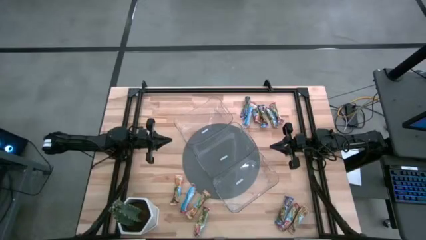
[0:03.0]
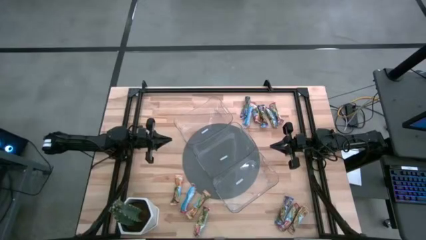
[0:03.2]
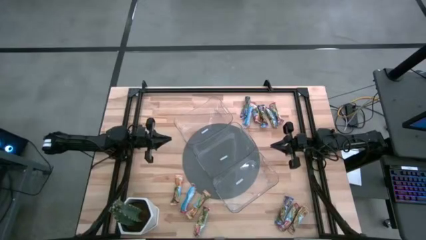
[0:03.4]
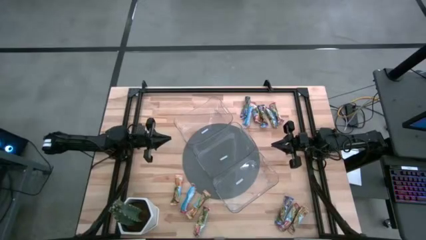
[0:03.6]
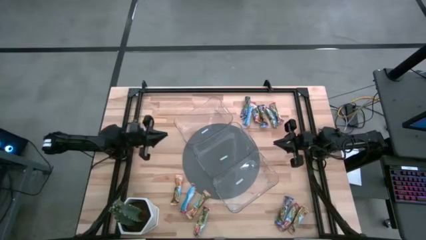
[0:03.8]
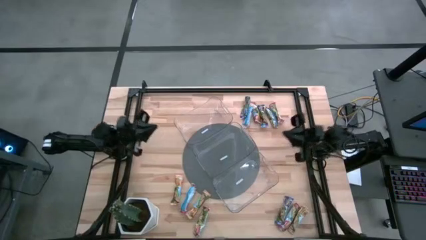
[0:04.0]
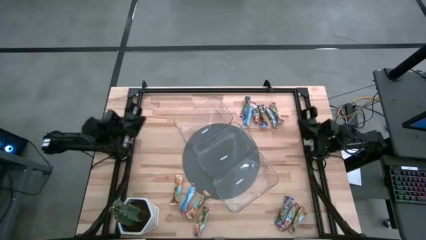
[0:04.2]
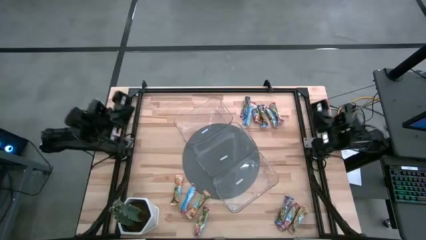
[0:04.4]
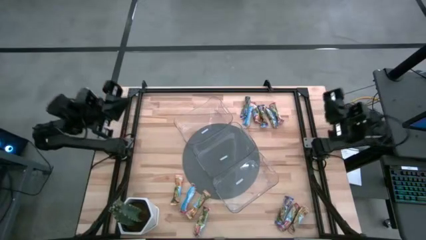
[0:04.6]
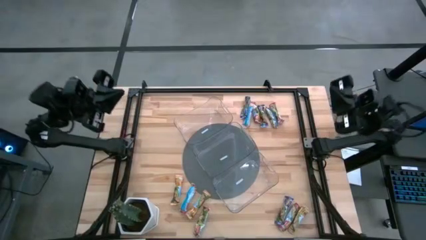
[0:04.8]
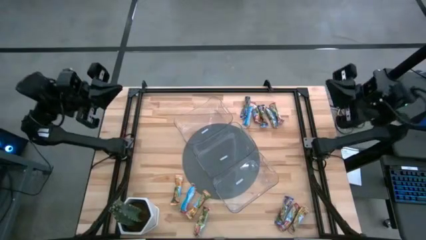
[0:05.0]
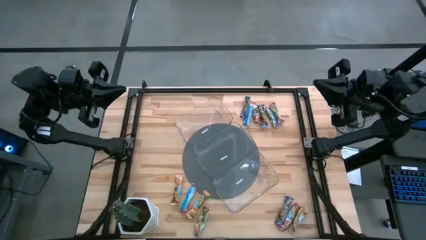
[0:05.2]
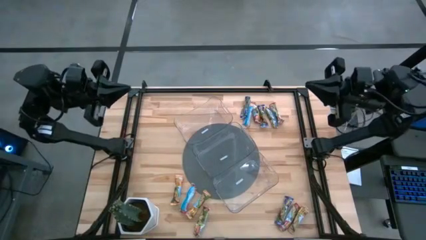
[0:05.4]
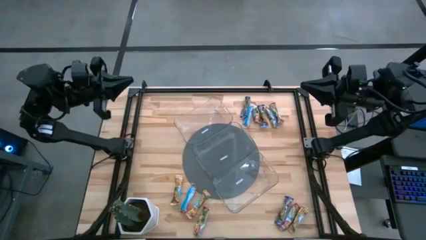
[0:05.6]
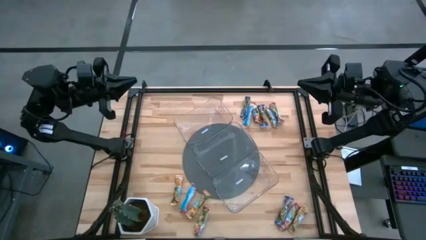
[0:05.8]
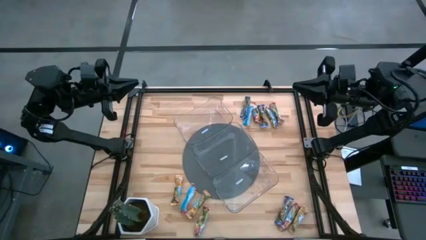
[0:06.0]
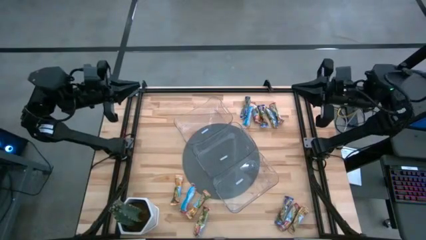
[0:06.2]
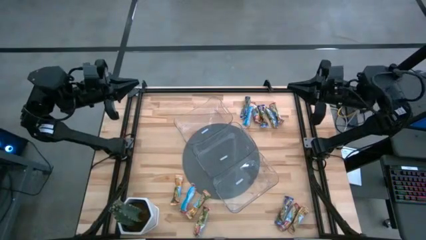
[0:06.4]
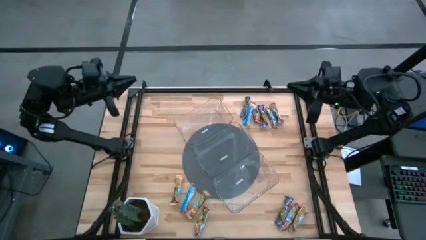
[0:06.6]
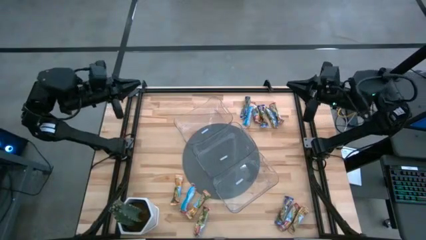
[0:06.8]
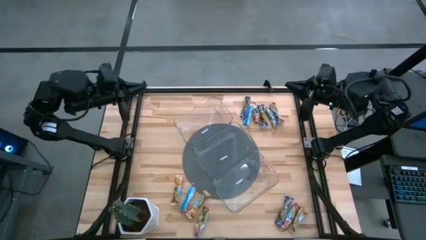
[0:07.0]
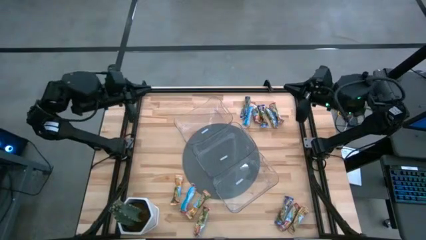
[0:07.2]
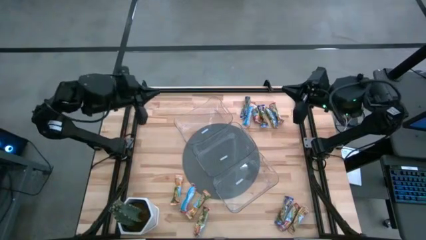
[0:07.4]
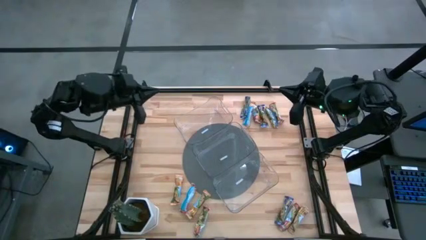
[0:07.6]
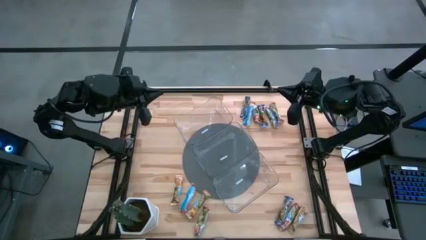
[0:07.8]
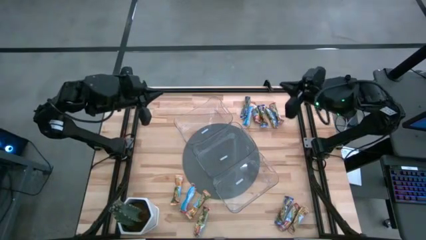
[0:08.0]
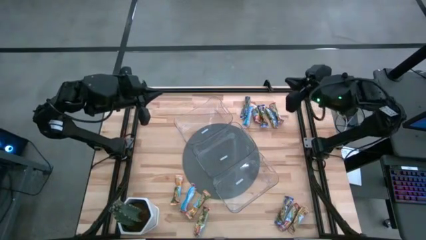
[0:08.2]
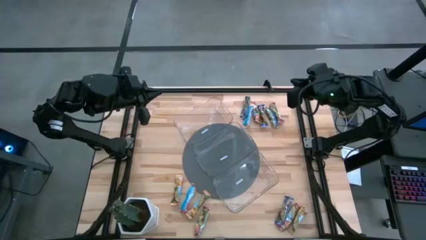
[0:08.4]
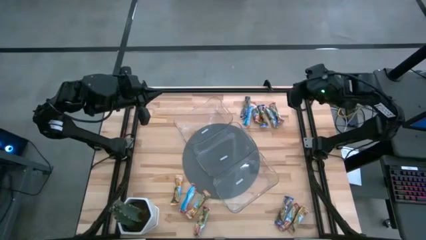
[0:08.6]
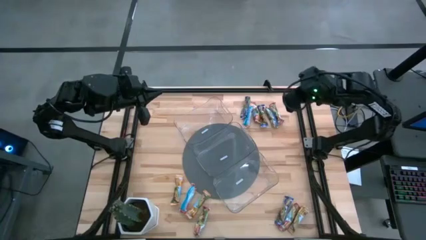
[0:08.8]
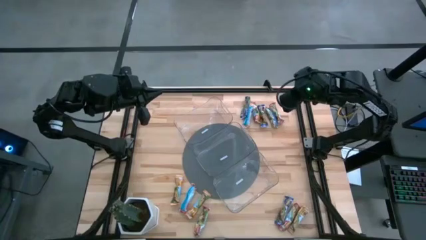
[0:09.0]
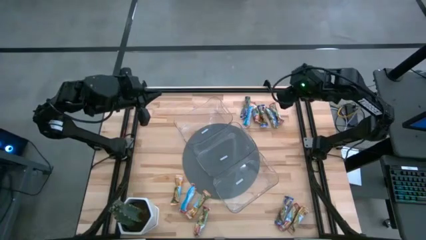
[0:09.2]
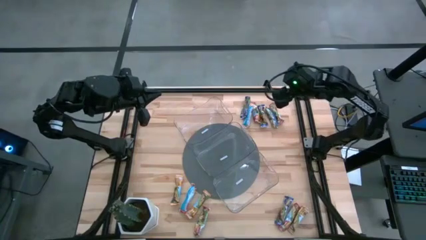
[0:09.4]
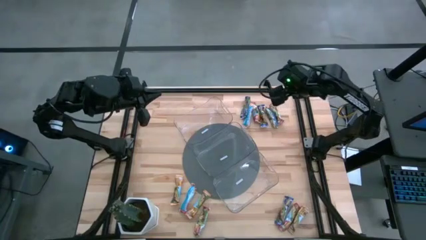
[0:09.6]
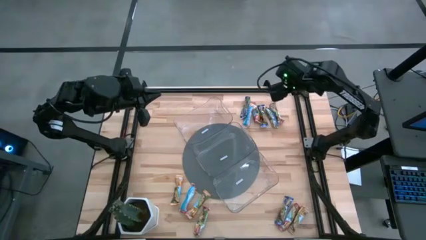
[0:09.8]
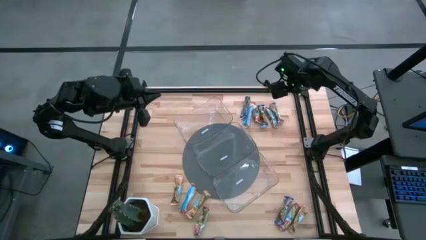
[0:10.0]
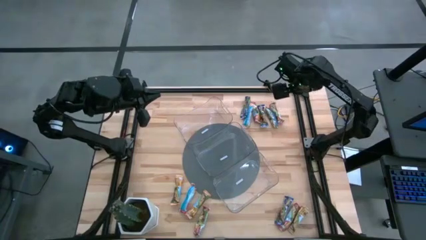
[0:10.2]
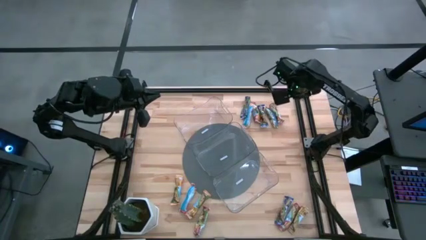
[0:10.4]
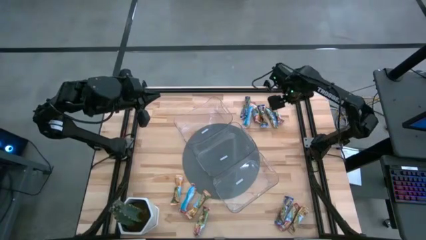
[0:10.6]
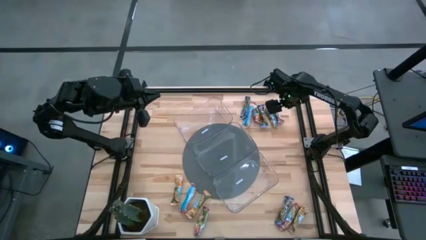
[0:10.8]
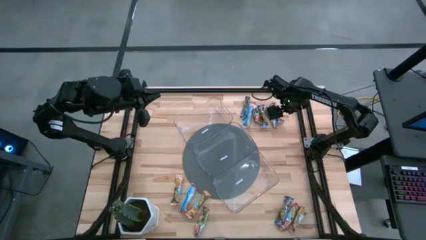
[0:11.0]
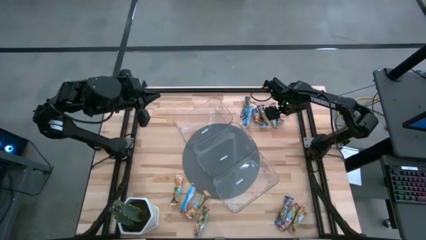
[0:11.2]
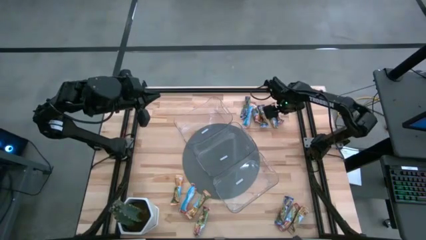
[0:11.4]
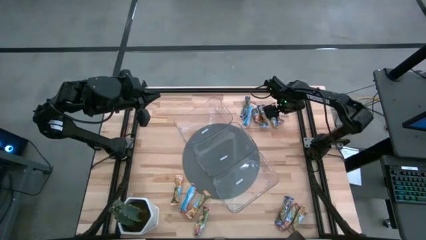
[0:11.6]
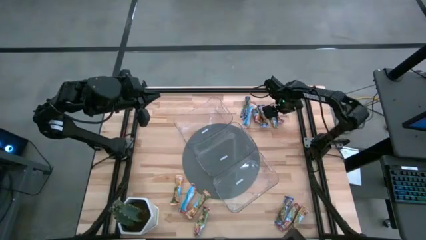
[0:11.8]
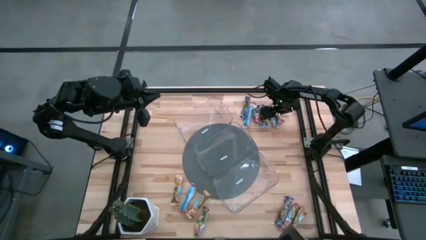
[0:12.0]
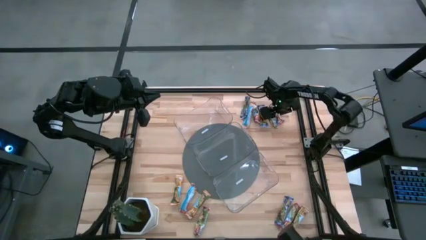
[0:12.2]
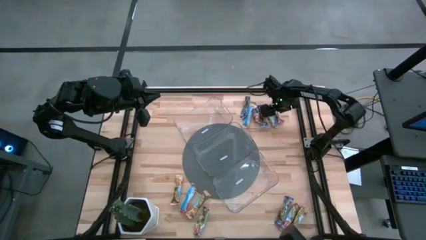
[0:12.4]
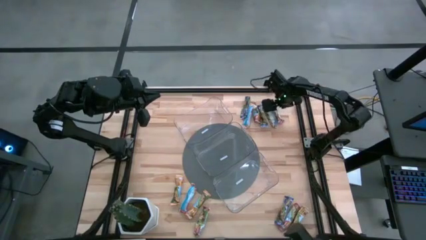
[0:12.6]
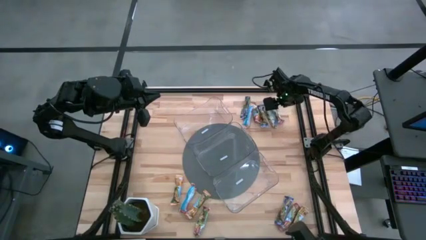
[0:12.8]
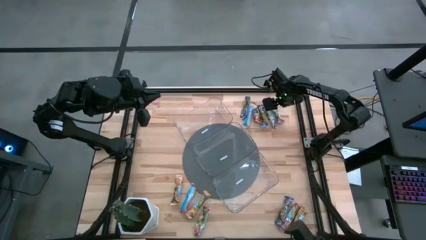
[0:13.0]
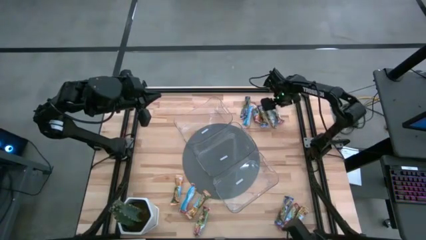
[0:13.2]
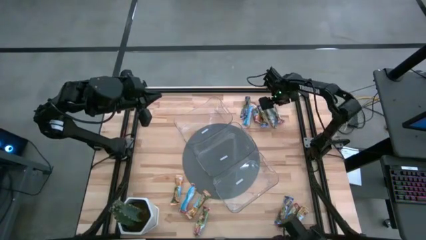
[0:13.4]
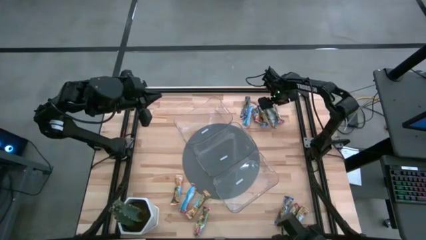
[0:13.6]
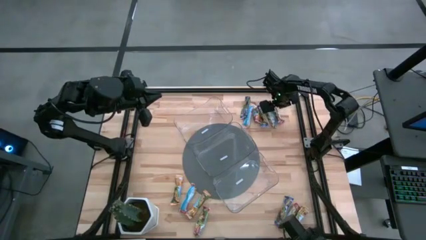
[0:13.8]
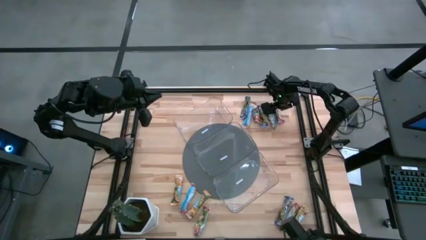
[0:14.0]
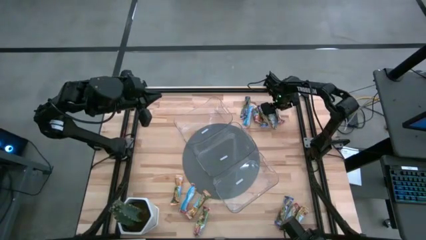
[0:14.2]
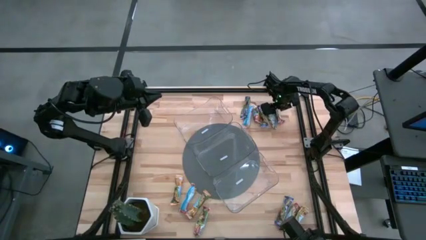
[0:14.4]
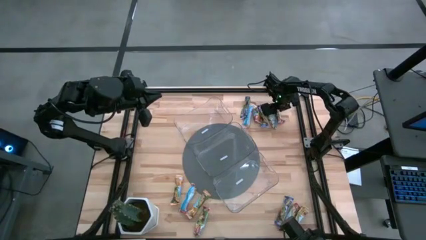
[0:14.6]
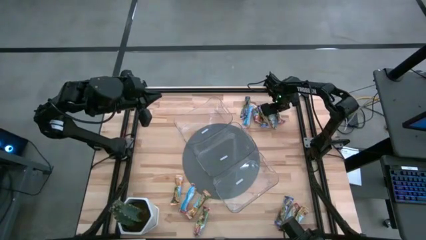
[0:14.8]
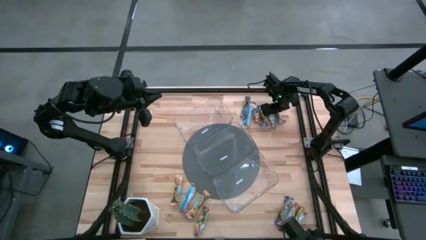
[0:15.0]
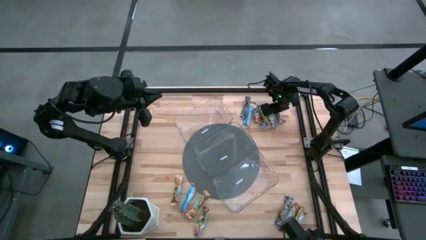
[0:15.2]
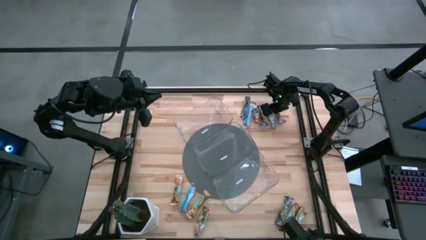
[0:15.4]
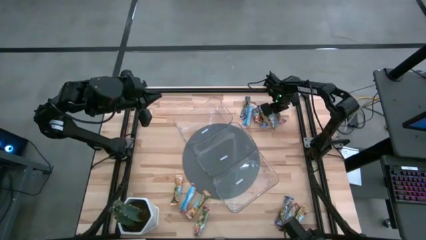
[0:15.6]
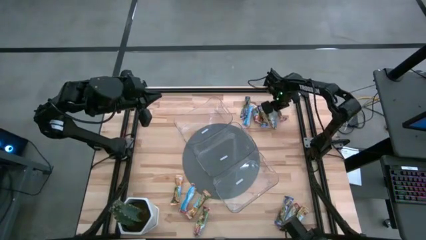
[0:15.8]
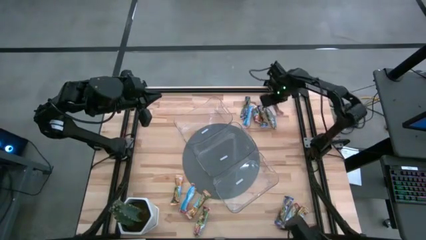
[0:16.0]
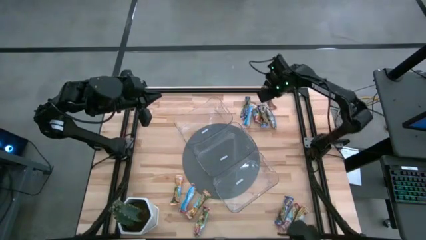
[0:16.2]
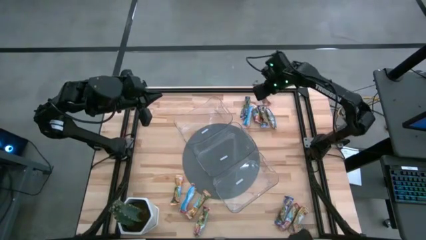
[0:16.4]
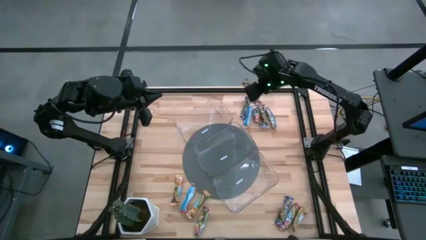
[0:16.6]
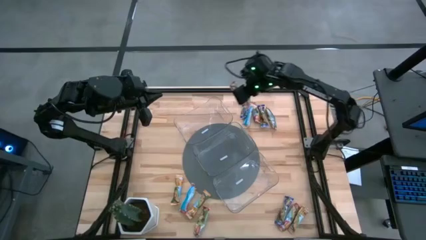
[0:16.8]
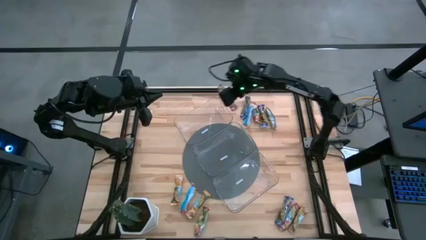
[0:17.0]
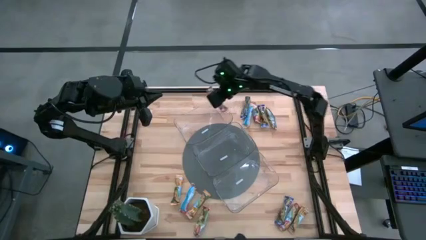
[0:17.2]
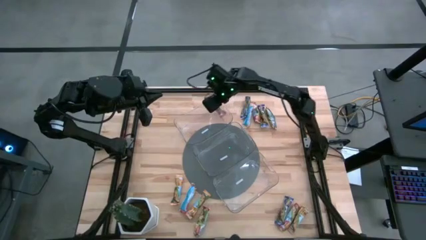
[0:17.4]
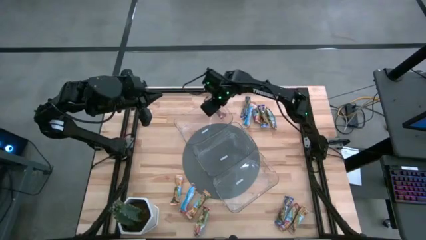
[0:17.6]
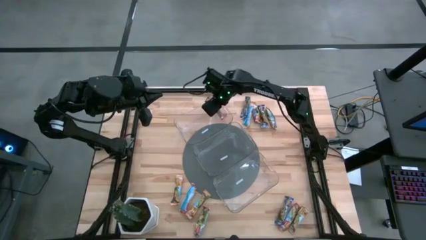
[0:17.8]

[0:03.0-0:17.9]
Task: Pick and place Granola Bars by type
Put the red granola bar into the top transparent bin
